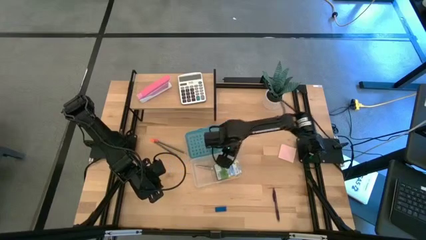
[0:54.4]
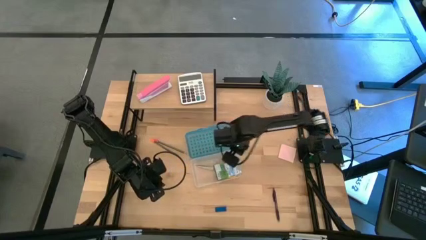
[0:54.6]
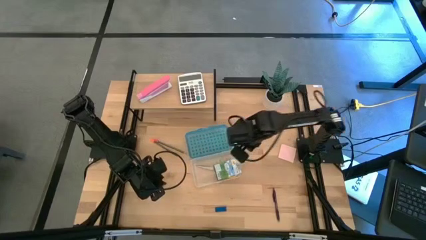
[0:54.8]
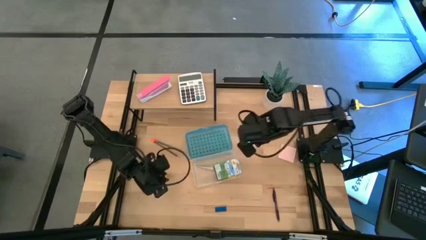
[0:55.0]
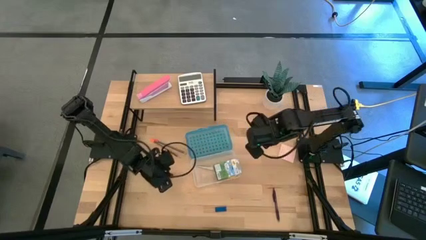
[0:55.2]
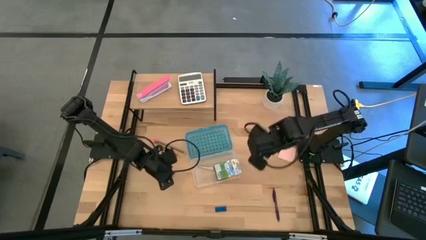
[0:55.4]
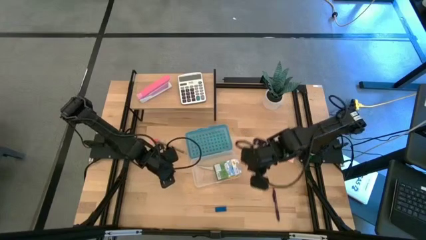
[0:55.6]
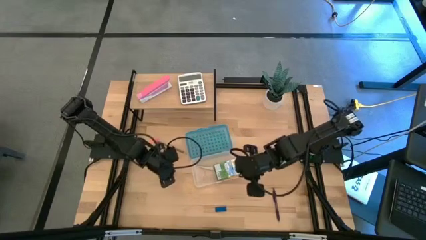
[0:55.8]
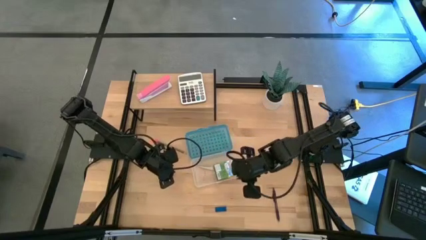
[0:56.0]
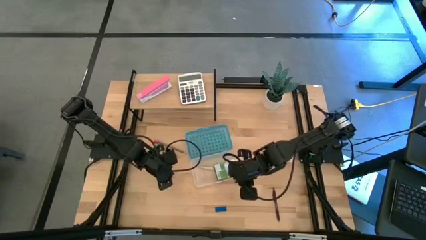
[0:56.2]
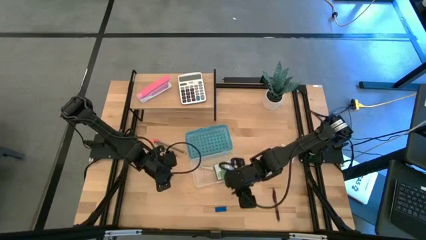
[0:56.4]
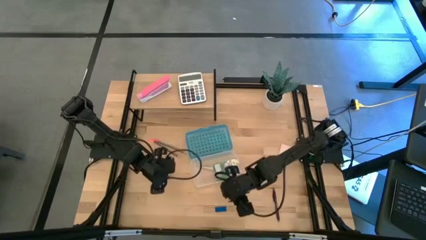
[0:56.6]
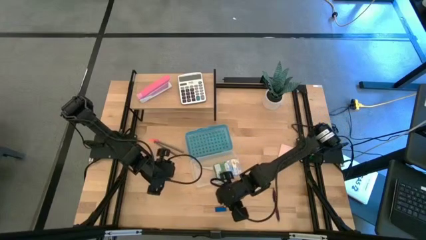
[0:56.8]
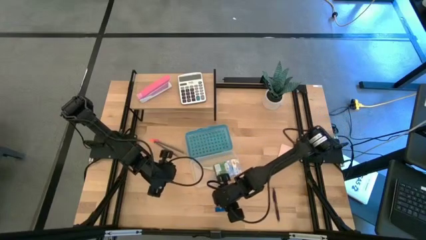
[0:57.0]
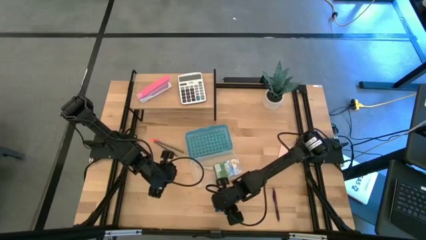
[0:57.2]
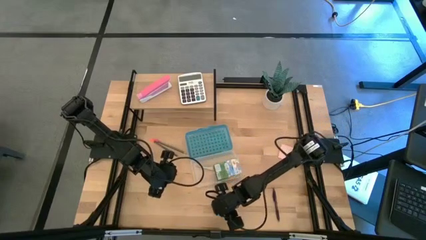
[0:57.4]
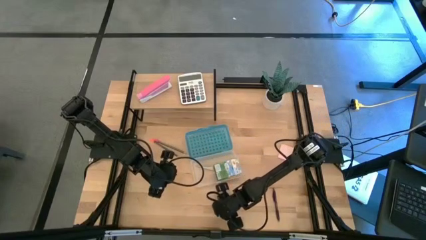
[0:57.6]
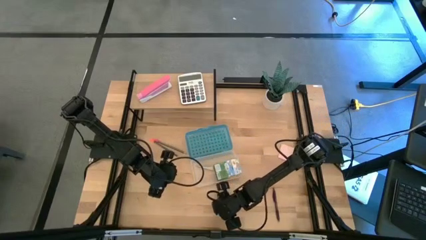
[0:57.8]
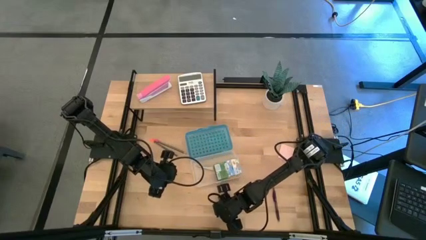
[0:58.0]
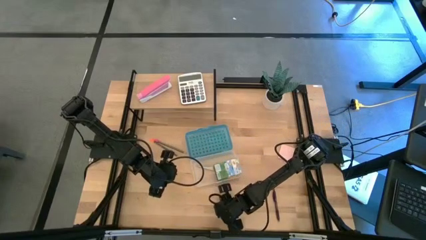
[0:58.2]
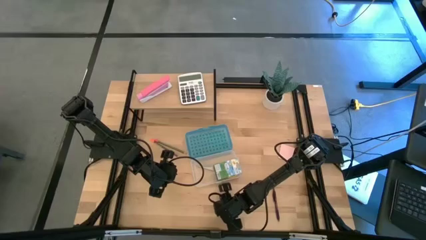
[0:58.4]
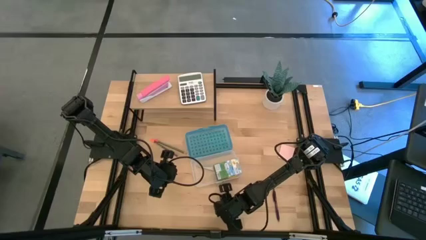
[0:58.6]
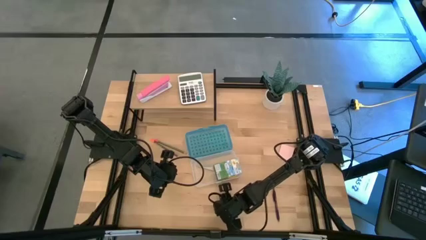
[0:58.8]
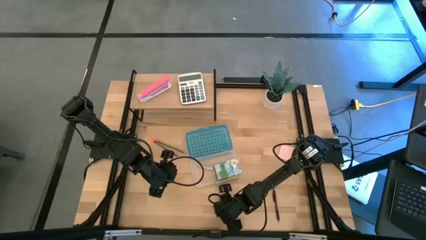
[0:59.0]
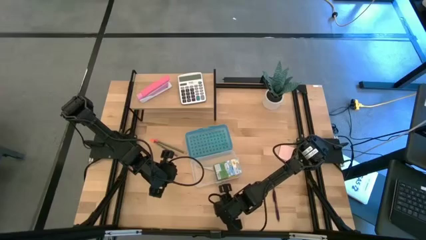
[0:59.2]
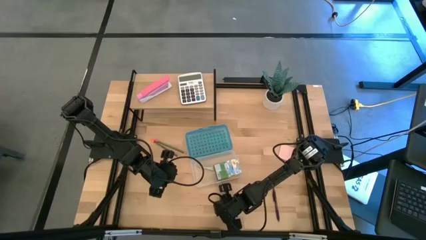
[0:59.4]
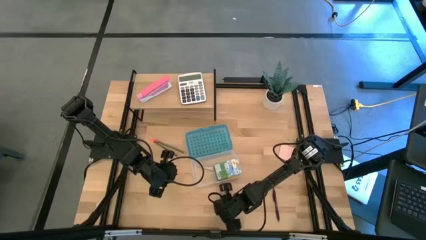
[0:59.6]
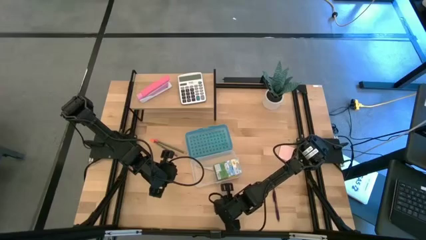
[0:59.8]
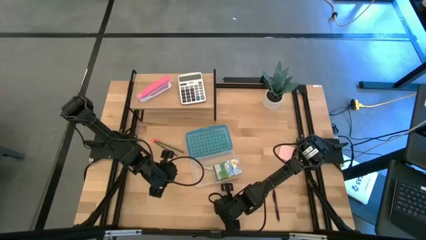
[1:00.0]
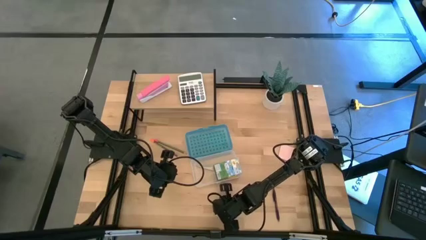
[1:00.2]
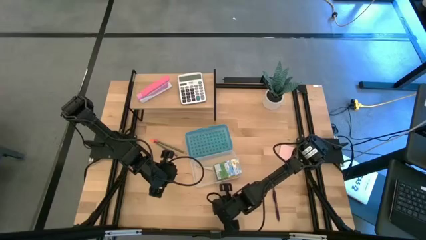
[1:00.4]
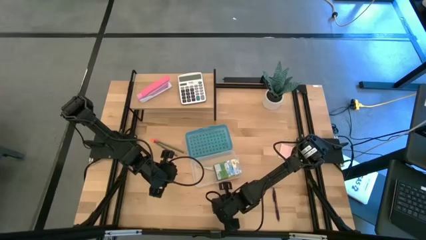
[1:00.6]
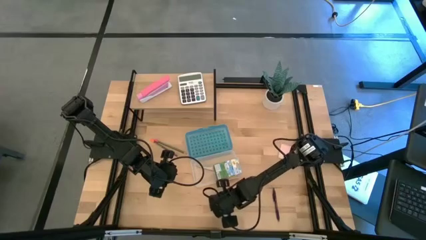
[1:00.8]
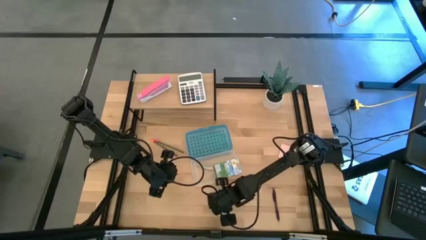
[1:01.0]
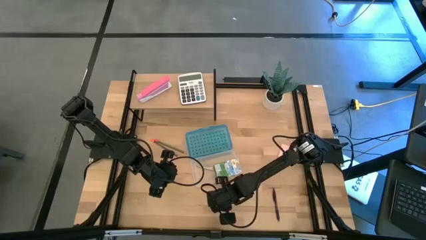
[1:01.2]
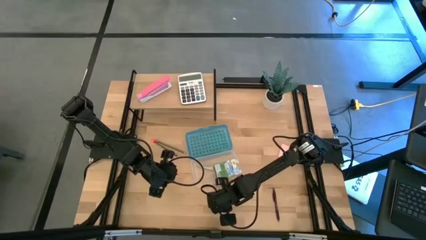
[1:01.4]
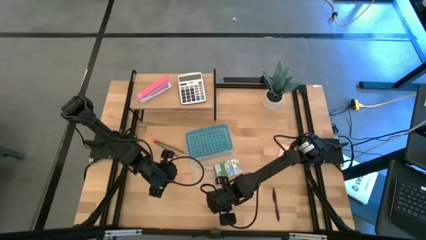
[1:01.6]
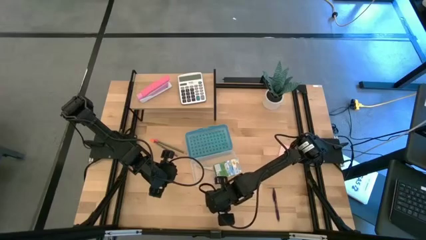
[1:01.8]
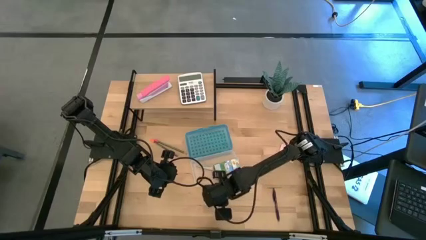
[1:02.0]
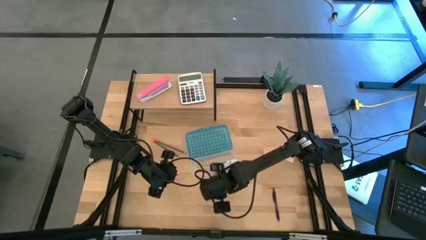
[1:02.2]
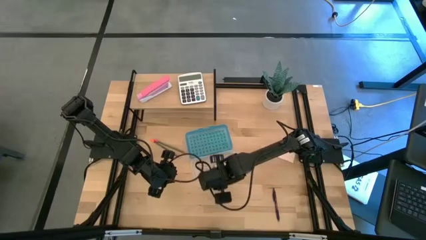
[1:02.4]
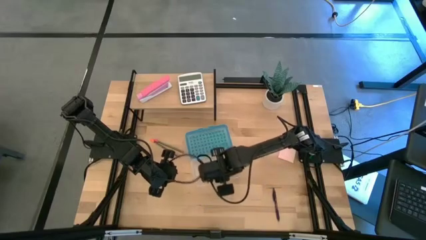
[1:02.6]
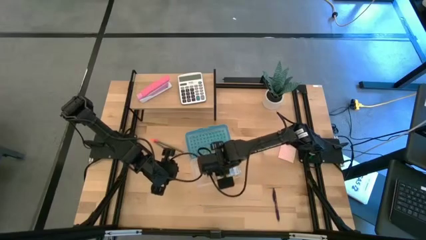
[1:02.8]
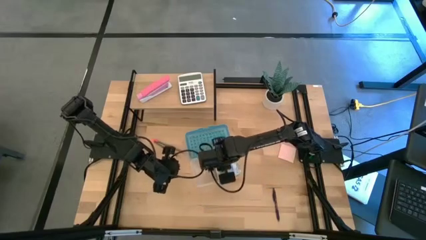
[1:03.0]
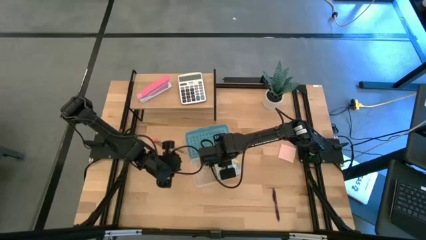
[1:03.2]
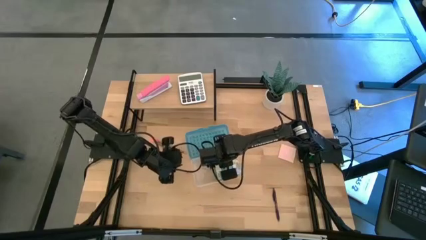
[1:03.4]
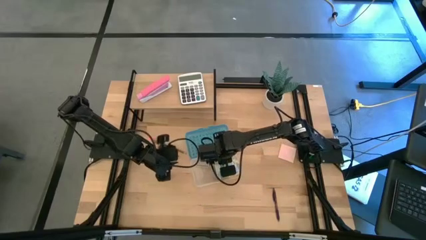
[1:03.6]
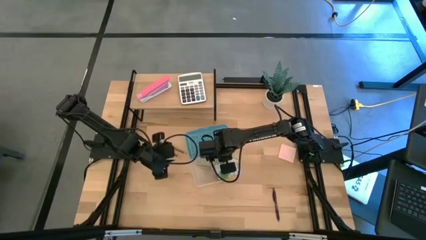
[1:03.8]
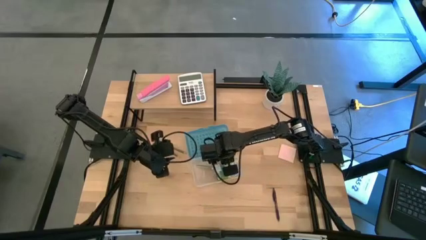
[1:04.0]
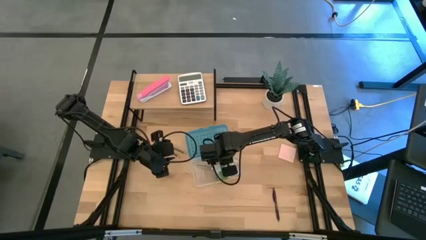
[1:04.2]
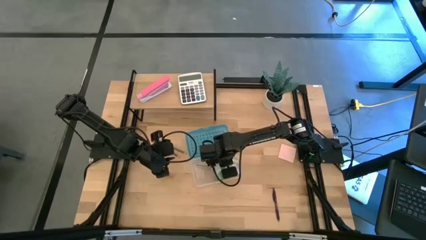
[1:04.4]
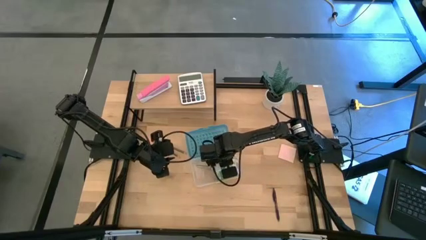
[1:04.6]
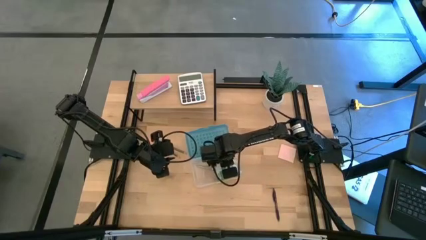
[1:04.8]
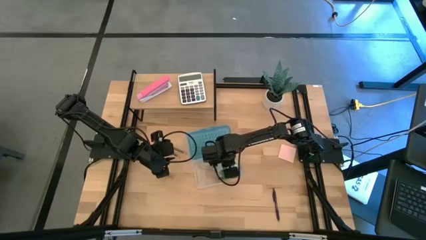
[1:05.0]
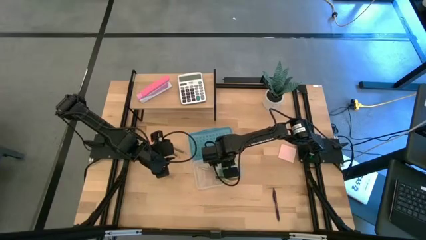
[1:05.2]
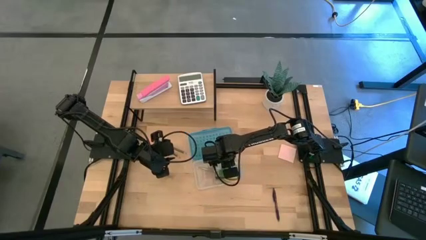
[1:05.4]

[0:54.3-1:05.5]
Task: Pack school essentials
Put the blue eraser into the blue supply box
